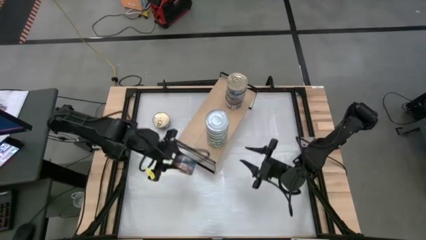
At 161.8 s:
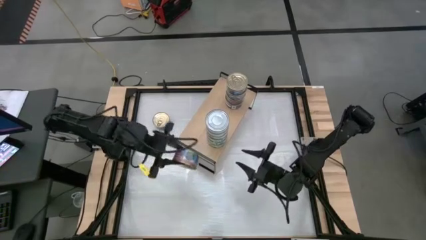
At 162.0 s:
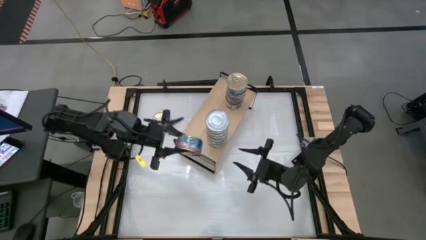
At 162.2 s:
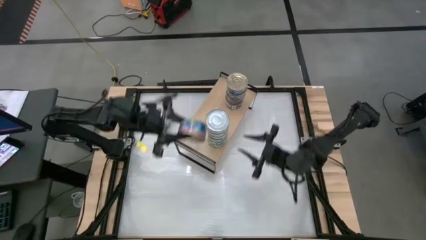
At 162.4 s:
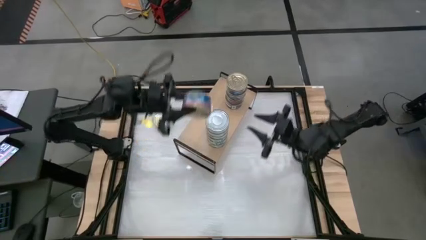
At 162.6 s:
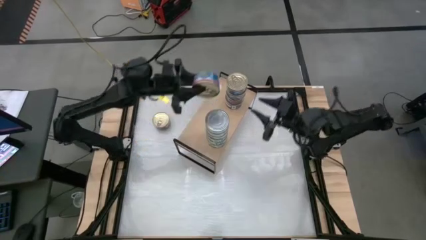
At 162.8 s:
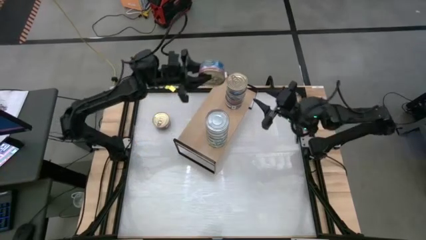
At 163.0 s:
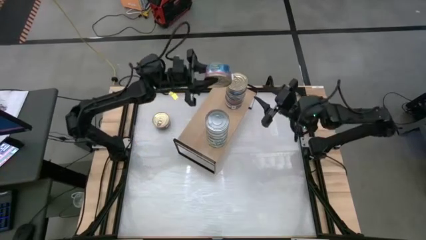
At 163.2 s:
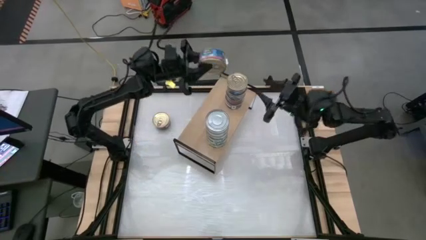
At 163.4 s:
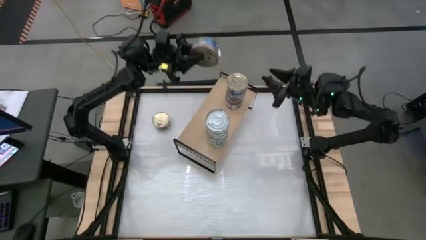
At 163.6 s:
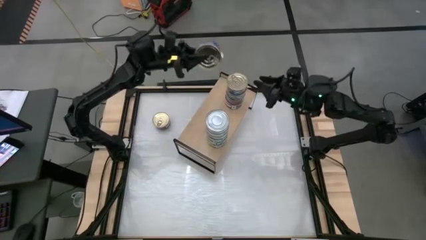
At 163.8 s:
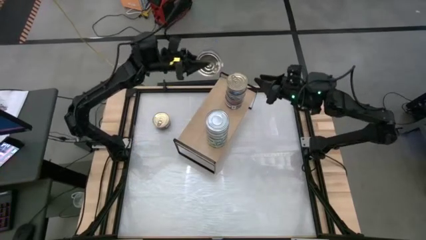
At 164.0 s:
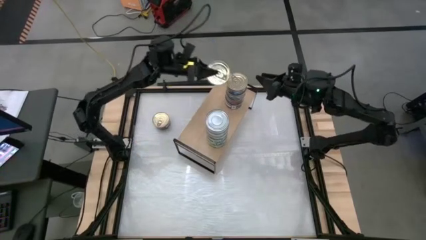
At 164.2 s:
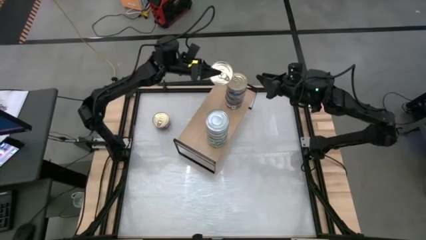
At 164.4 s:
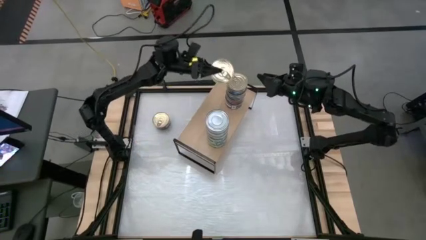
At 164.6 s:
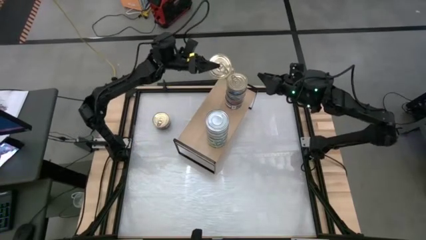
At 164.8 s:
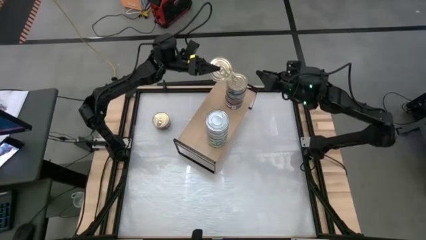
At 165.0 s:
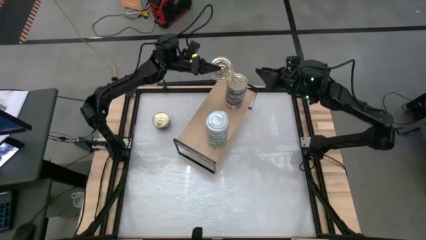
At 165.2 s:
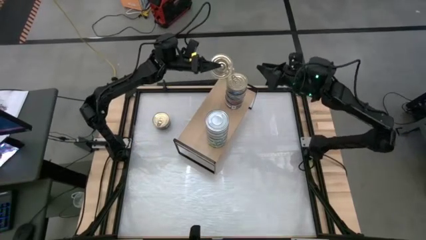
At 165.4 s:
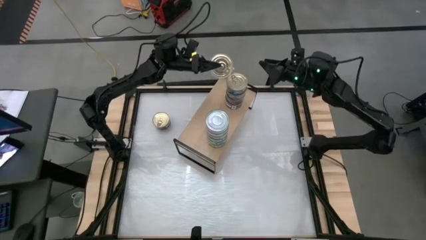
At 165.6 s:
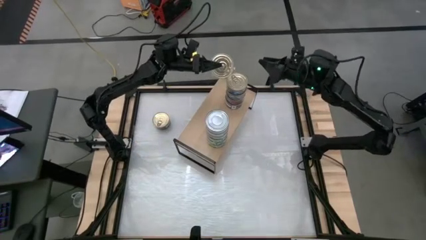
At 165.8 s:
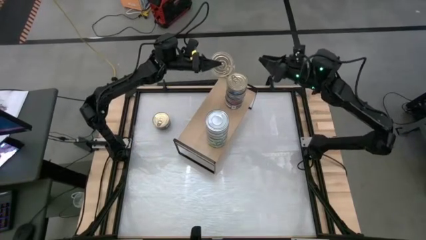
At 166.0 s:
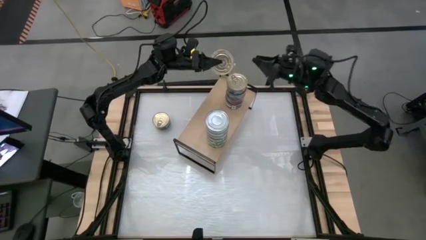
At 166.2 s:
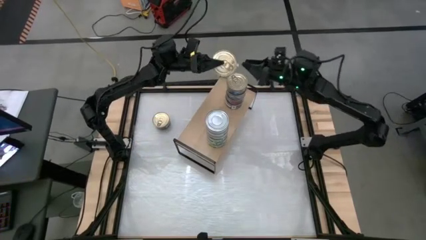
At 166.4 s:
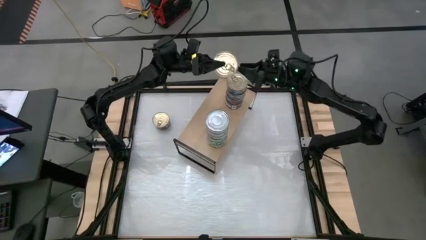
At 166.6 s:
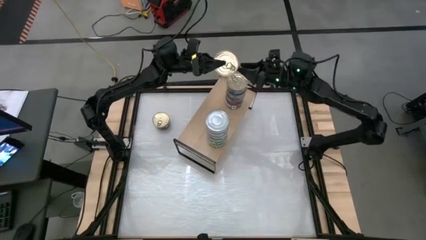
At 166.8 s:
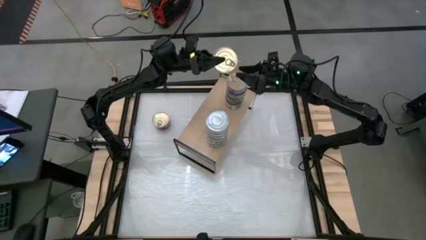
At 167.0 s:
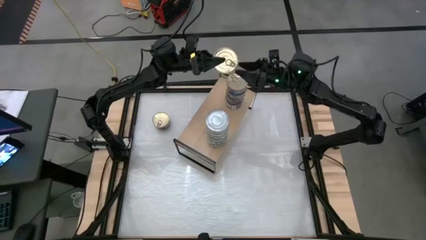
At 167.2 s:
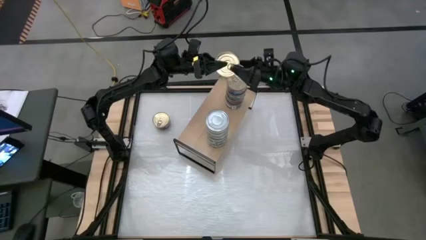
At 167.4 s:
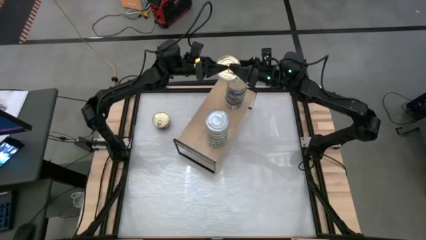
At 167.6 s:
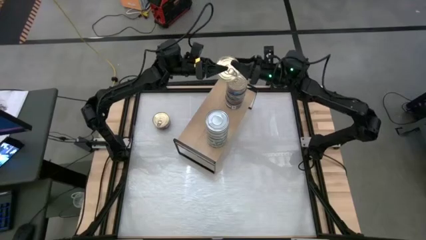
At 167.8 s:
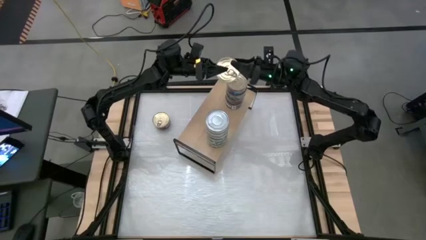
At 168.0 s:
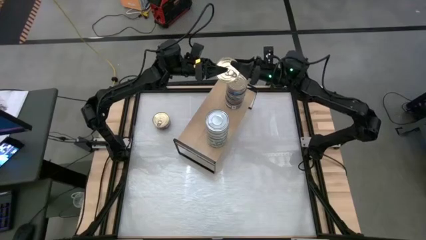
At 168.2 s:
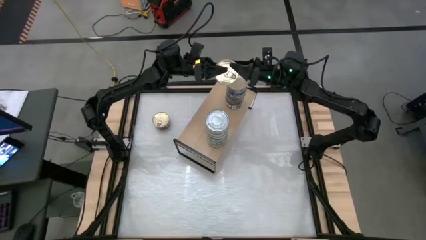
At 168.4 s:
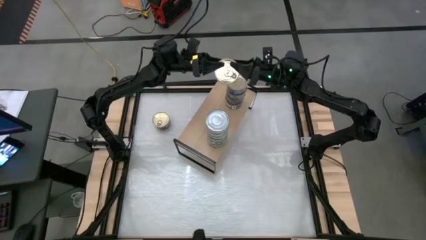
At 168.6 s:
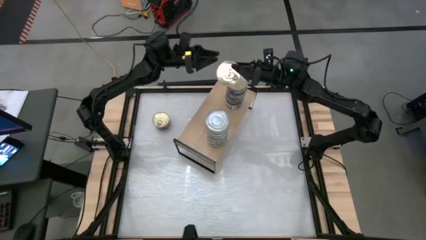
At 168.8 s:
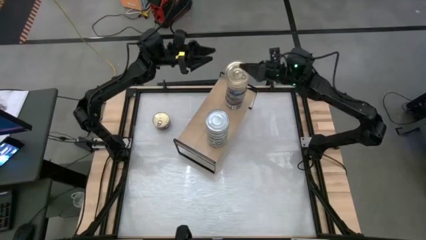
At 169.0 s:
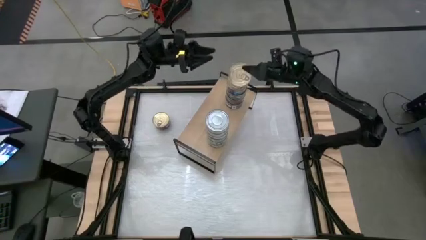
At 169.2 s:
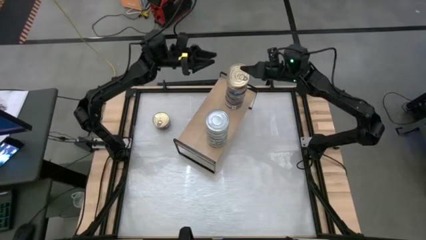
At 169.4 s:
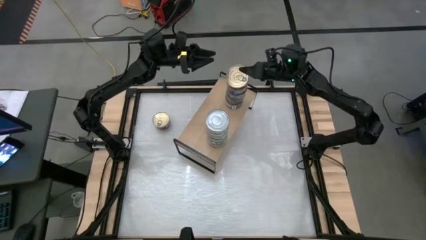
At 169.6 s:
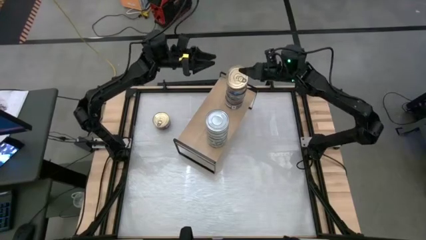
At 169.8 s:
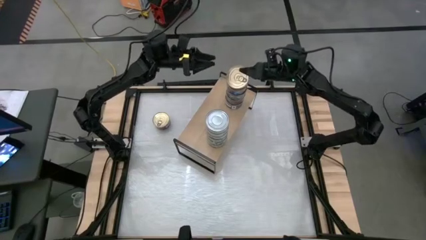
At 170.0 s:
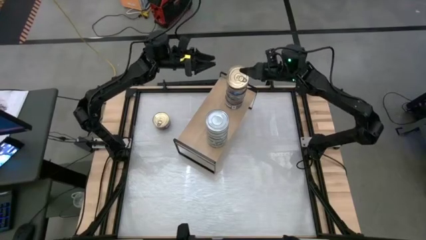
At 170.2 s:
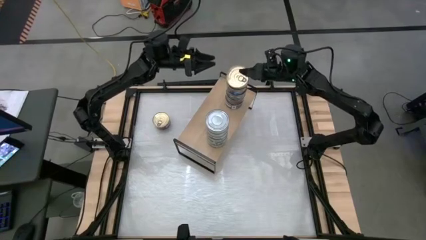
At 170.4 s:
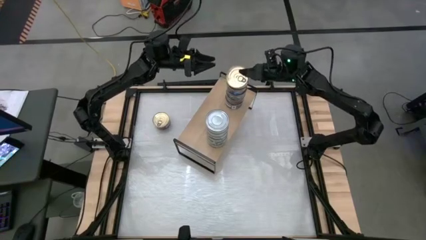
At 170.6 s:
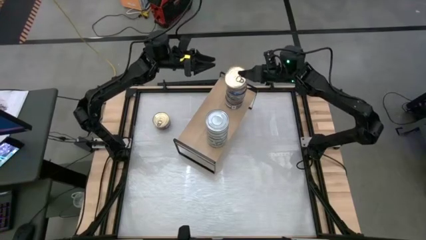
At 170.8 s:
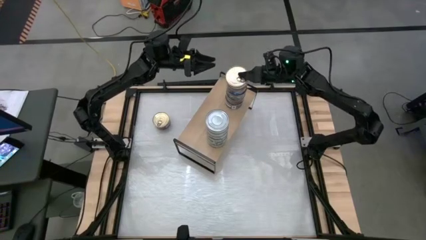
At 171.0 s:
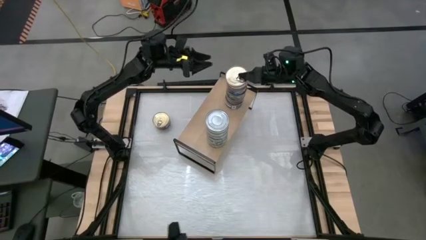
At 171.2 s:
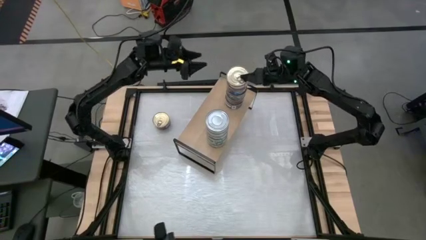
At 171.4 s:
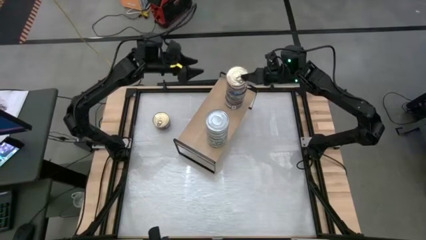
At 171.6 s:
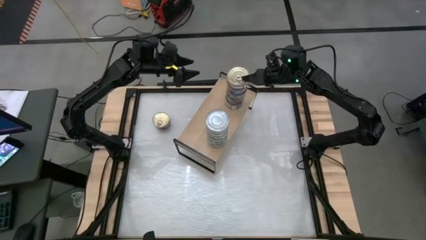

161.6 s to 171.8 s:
Task: Stack canned seafood by type on shelf
Stack the blue tuna can on top of the other blue tuna can
